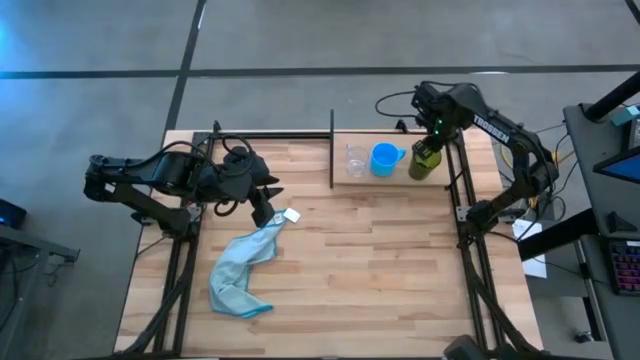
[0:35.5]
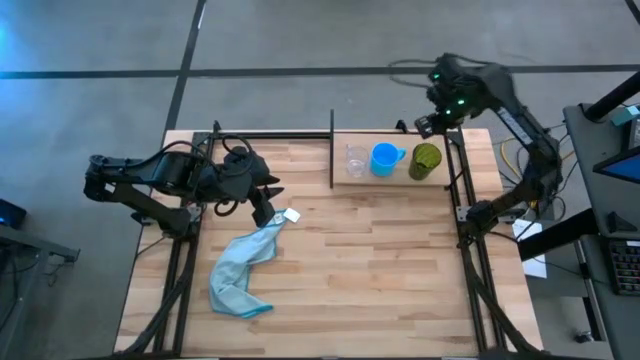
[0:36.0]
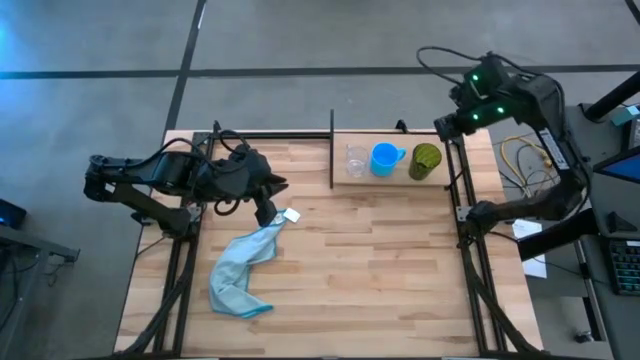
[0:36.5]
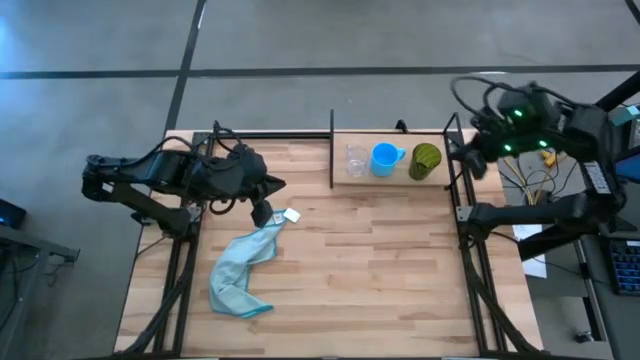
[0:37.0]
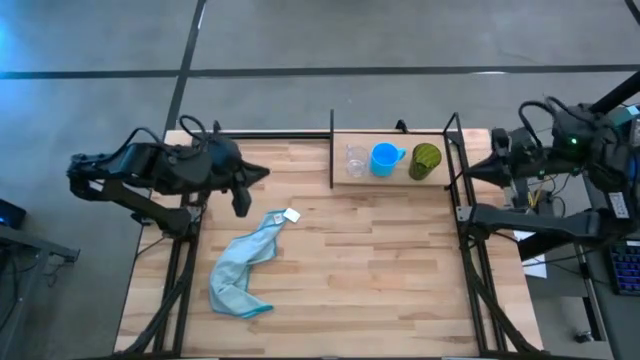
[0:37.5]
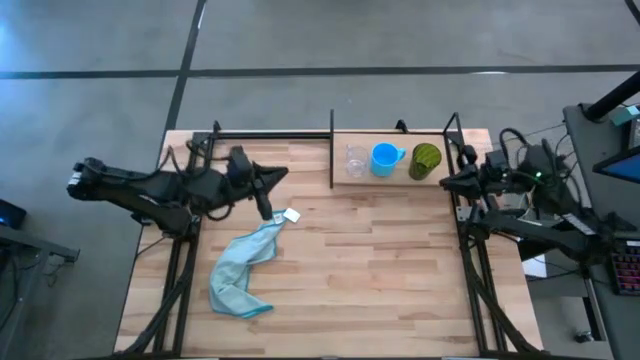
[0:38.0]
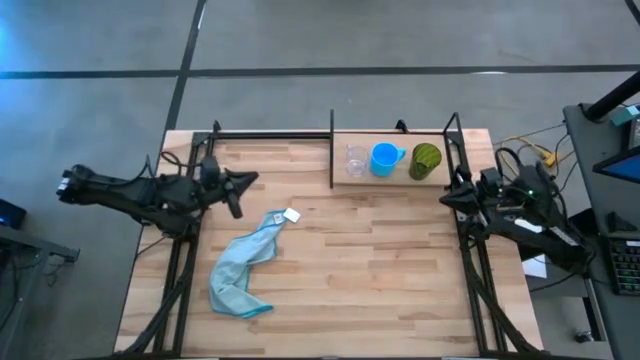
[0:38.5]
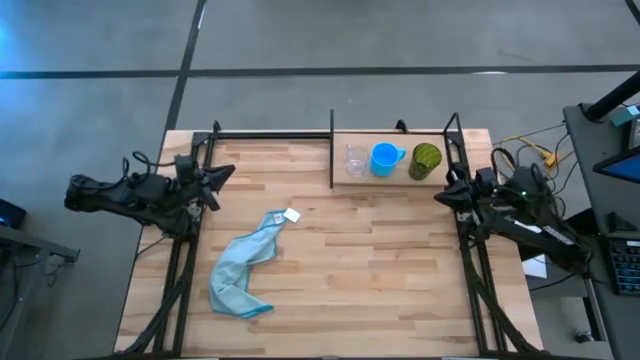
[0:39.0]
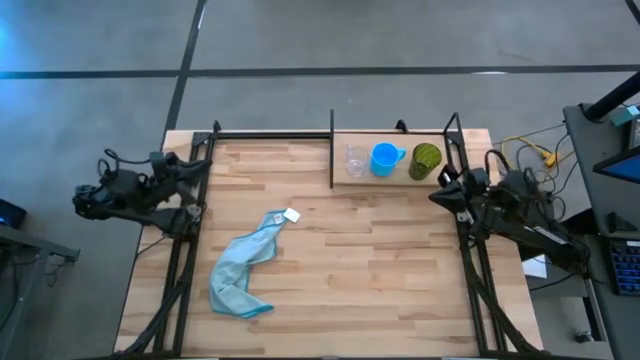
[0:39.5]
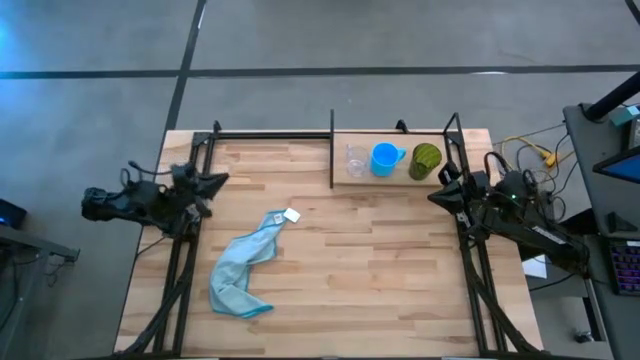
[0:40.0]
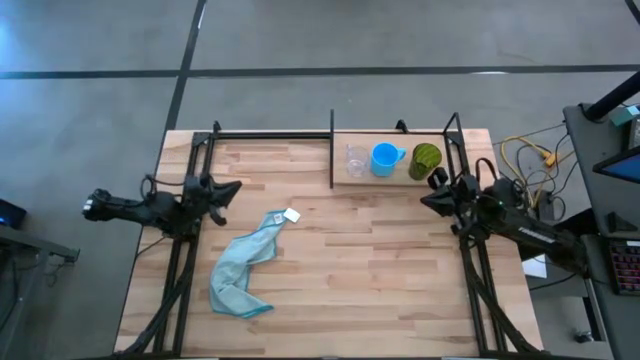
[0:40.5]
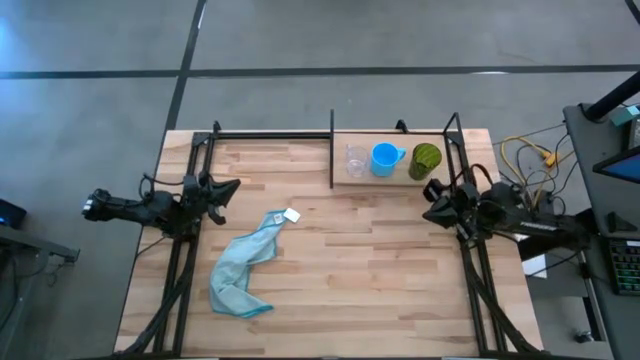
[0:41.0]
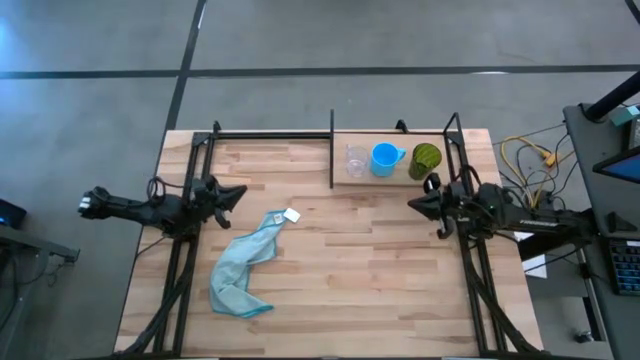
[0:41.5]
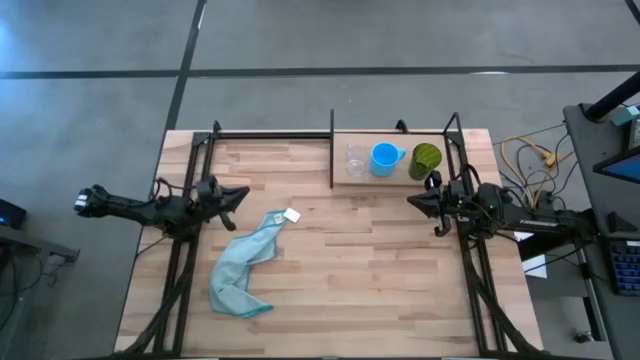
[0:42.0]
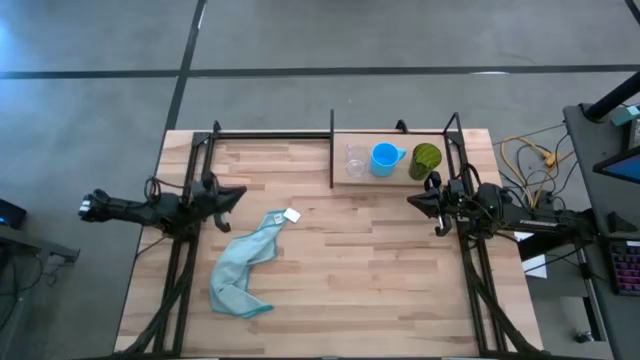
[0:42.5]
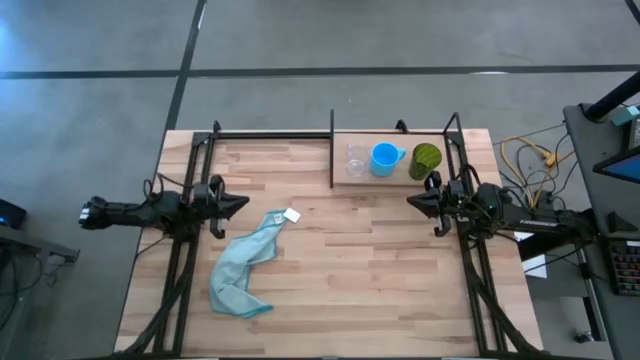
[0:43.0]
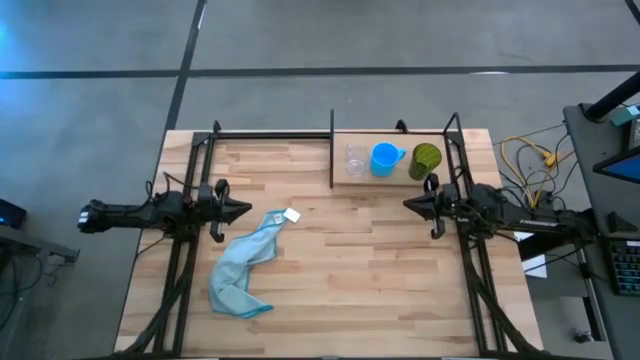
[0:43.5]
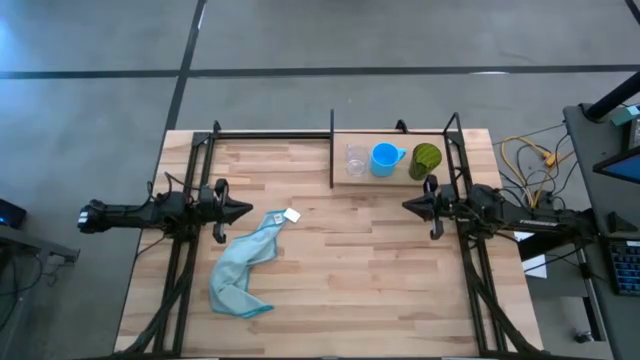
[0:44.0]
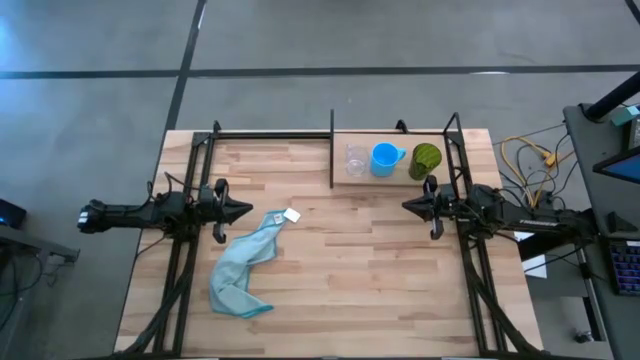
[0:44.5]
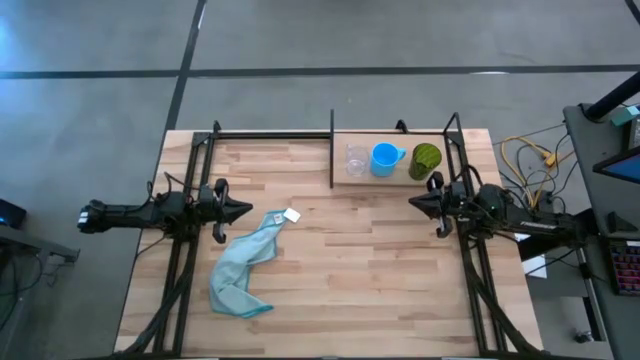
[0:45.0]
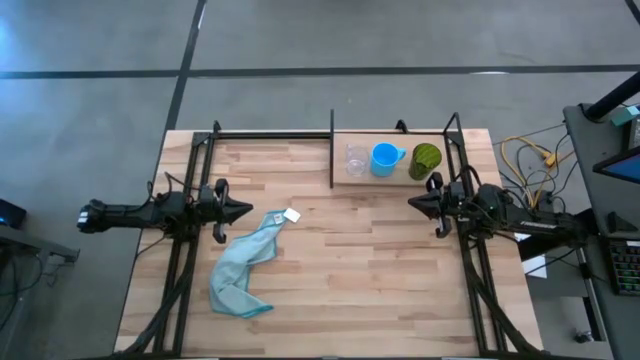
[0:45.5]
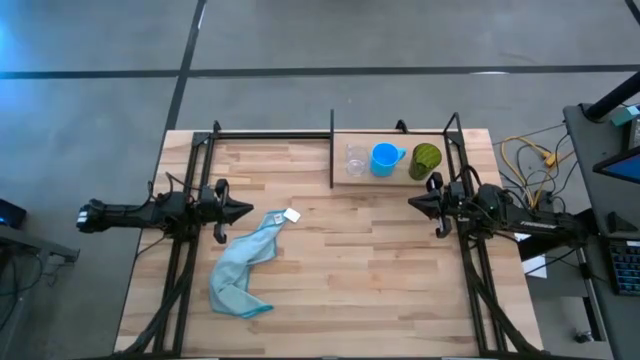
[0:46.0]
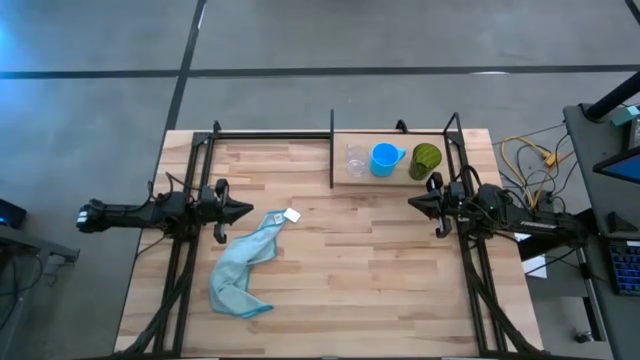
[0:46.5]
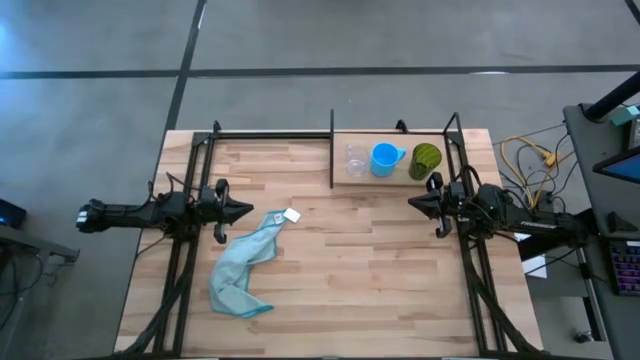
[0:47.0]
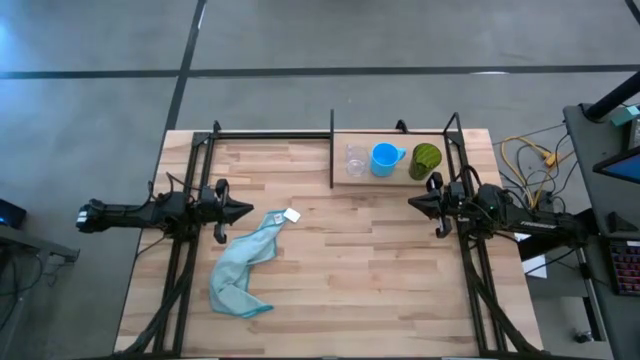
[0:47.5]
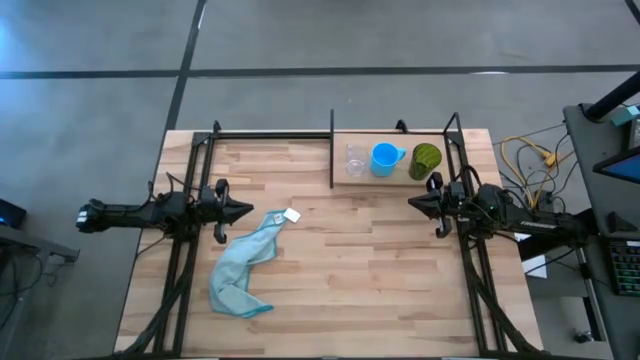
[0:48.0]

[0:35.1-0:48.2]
Task: Stack small to large cups/mugs on shelf
Return to Home Position
